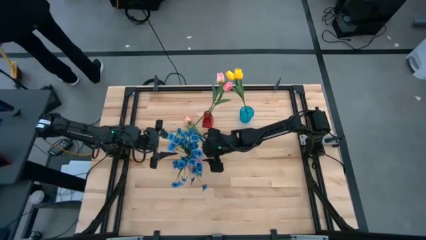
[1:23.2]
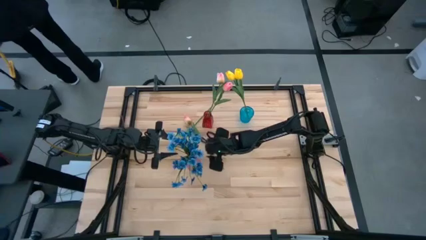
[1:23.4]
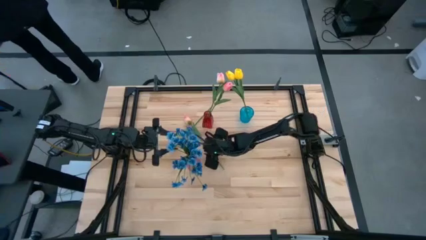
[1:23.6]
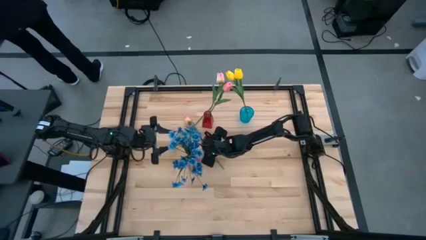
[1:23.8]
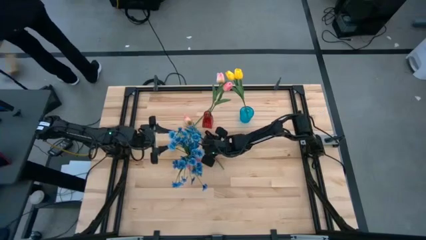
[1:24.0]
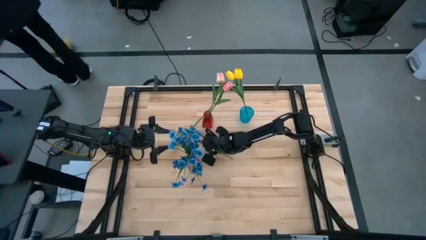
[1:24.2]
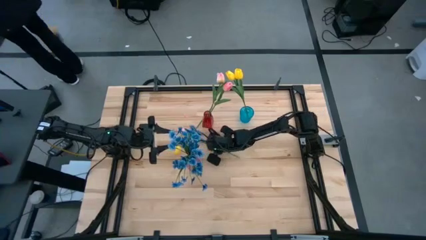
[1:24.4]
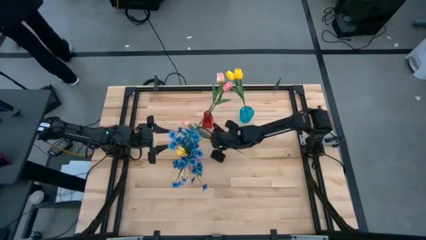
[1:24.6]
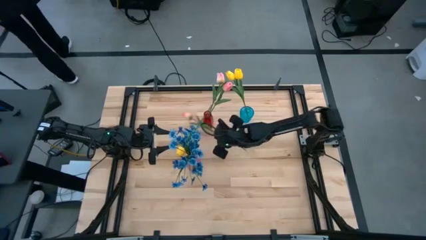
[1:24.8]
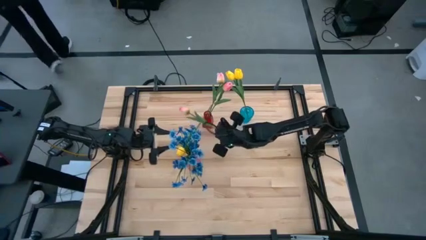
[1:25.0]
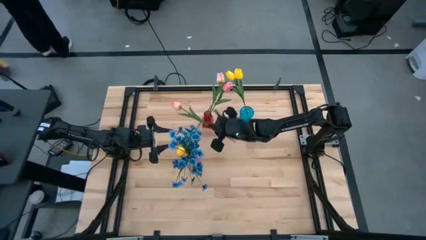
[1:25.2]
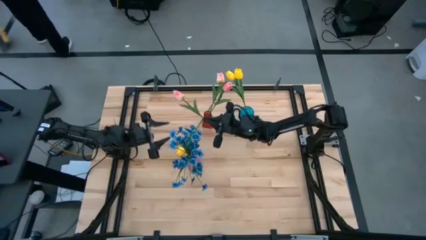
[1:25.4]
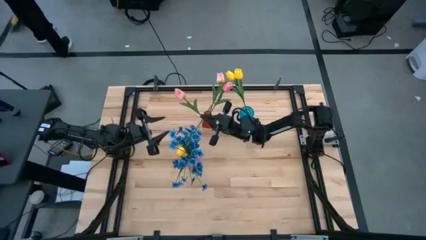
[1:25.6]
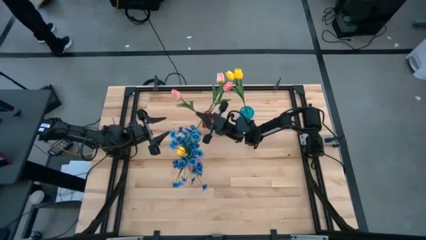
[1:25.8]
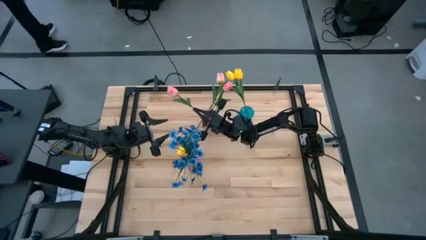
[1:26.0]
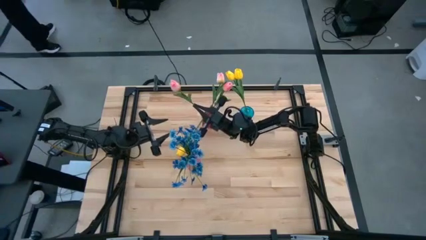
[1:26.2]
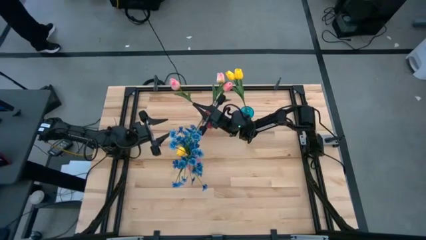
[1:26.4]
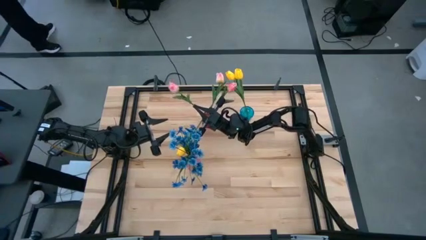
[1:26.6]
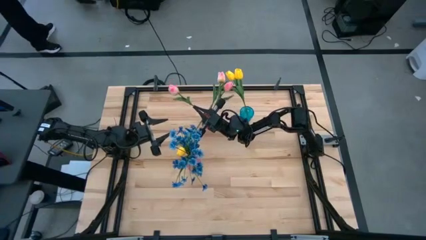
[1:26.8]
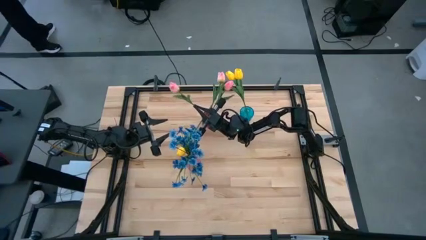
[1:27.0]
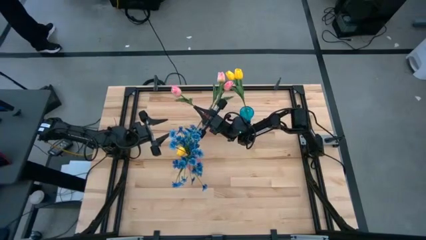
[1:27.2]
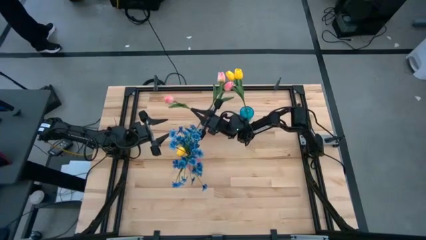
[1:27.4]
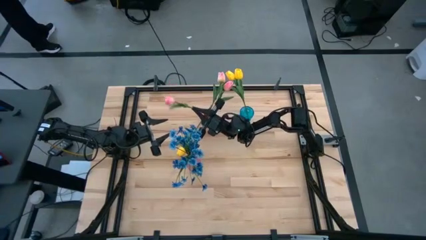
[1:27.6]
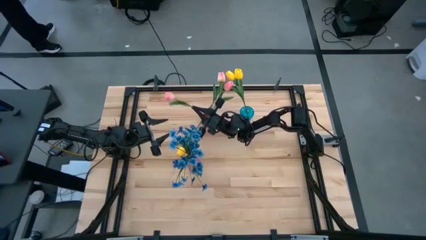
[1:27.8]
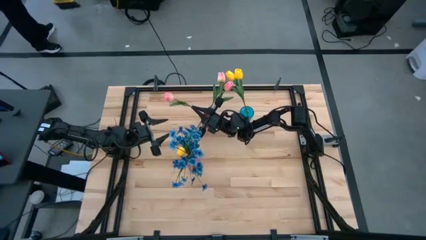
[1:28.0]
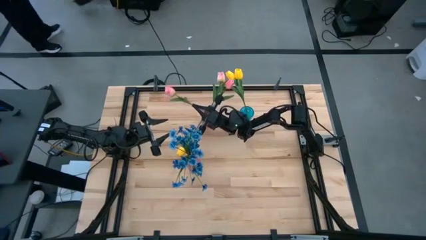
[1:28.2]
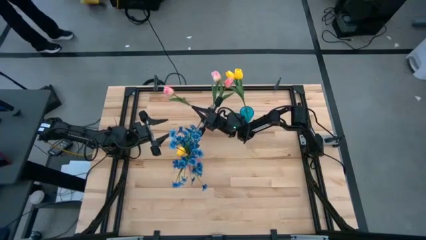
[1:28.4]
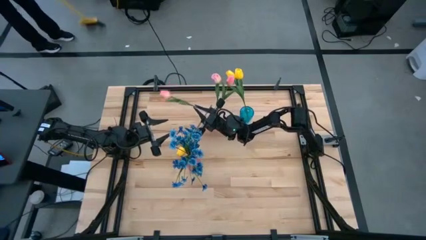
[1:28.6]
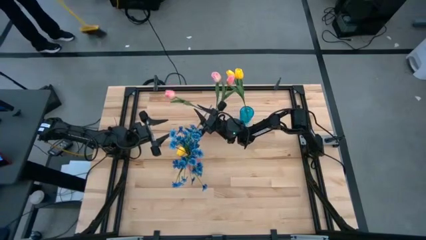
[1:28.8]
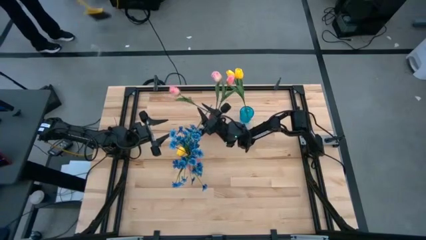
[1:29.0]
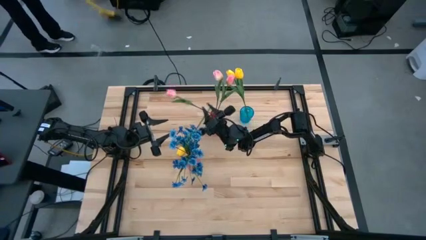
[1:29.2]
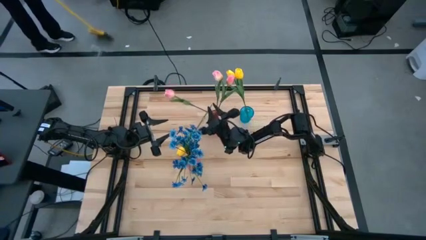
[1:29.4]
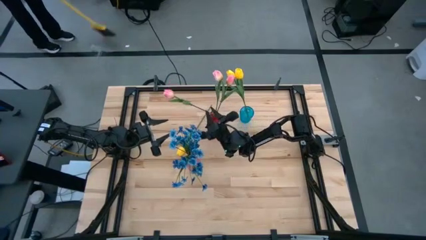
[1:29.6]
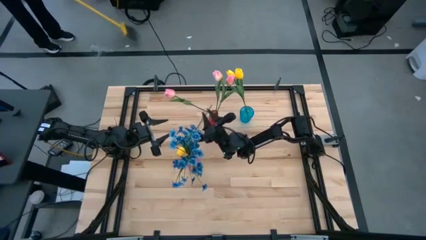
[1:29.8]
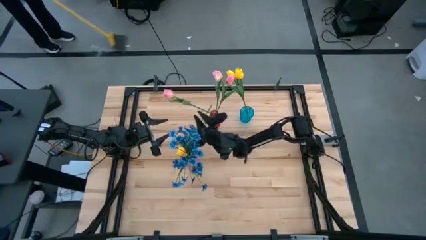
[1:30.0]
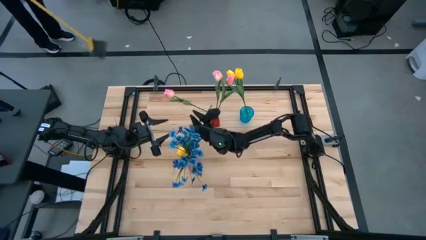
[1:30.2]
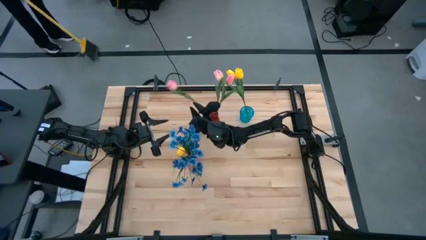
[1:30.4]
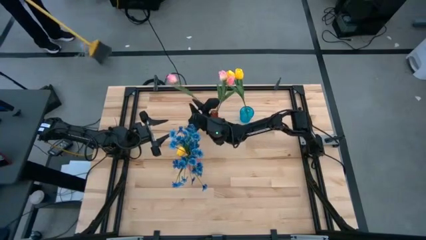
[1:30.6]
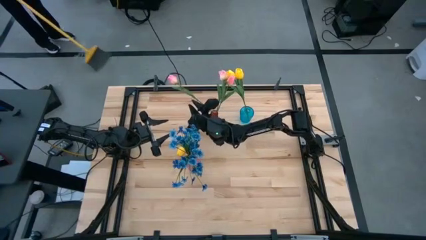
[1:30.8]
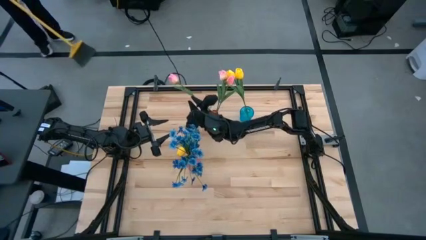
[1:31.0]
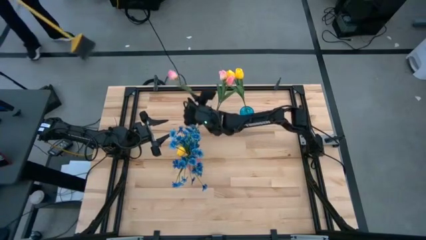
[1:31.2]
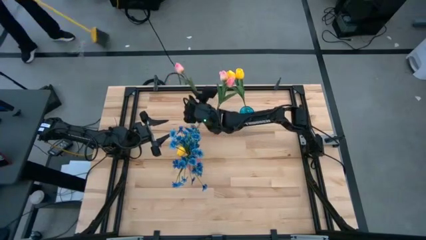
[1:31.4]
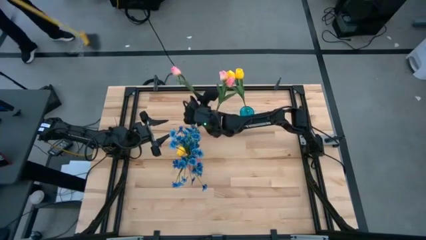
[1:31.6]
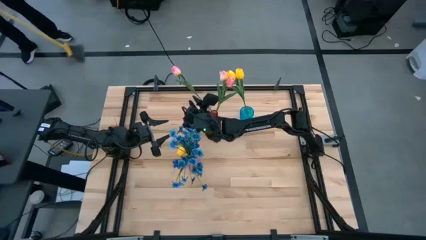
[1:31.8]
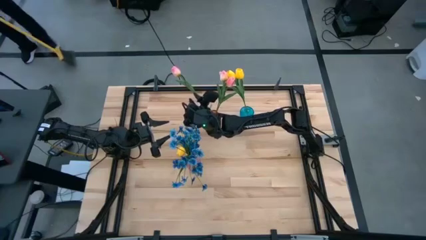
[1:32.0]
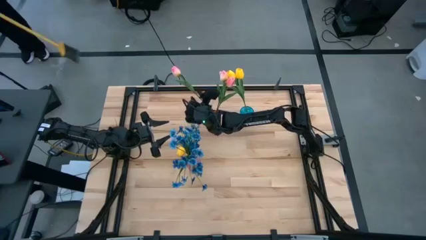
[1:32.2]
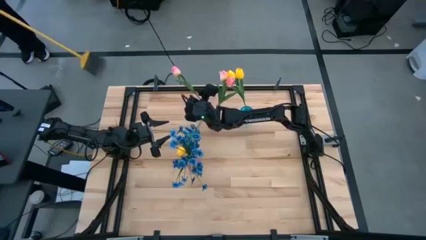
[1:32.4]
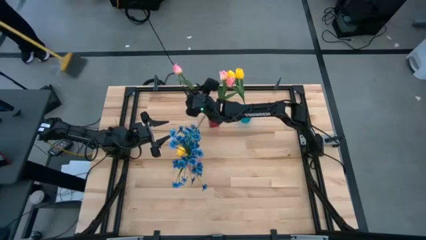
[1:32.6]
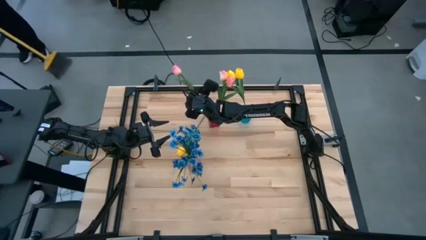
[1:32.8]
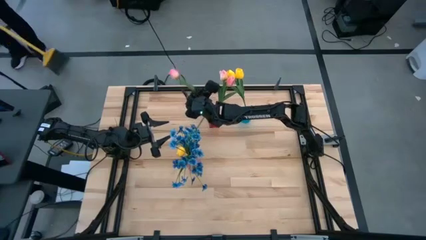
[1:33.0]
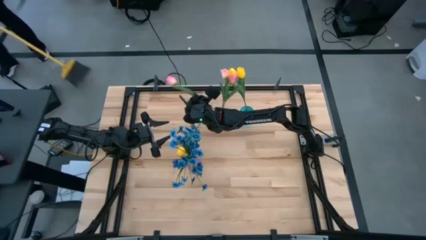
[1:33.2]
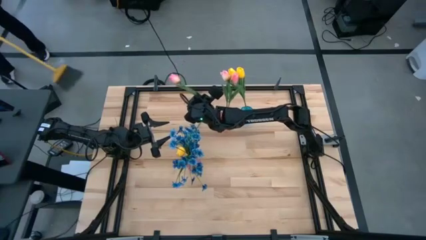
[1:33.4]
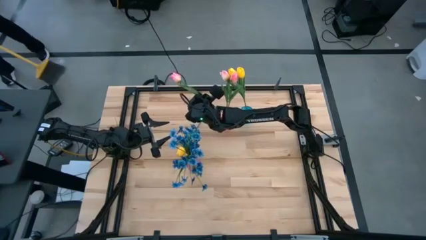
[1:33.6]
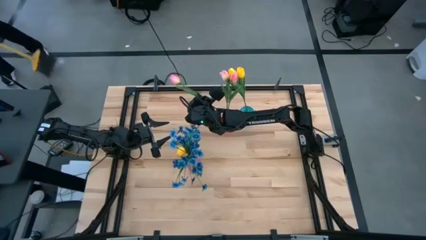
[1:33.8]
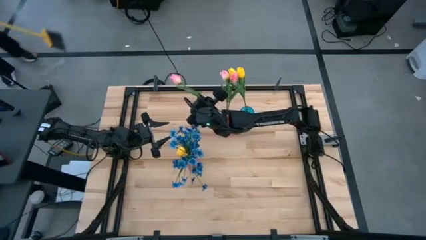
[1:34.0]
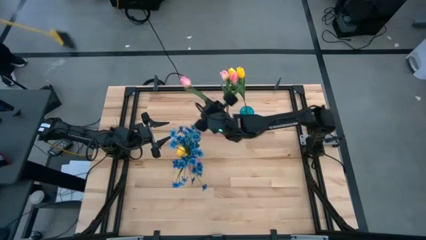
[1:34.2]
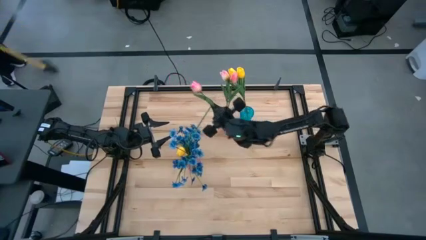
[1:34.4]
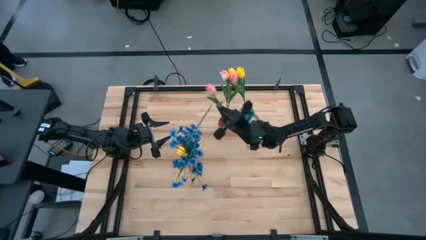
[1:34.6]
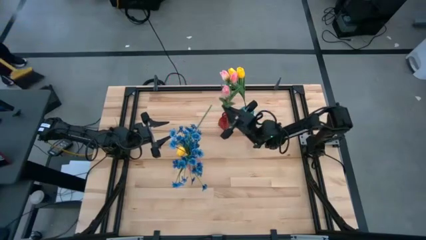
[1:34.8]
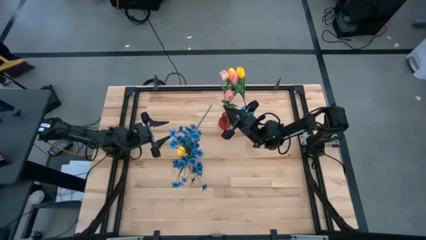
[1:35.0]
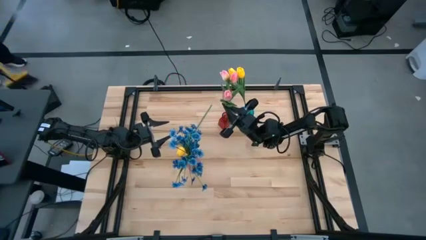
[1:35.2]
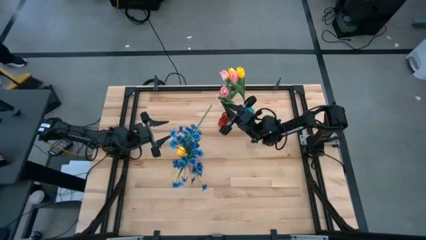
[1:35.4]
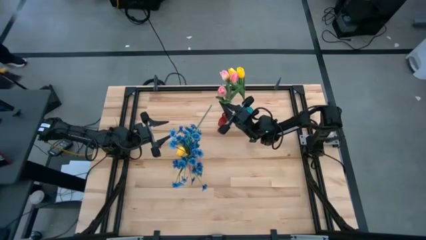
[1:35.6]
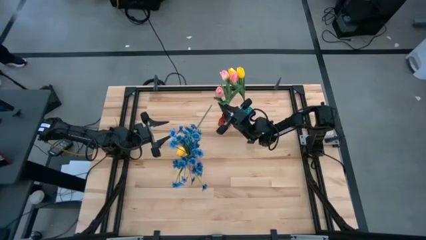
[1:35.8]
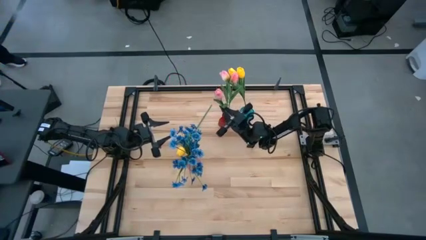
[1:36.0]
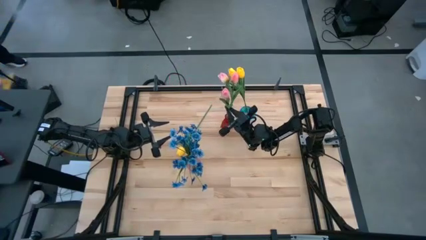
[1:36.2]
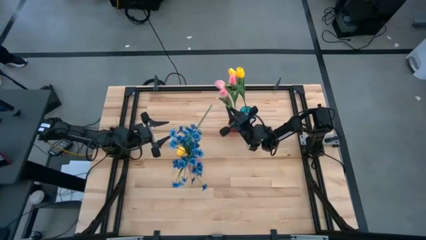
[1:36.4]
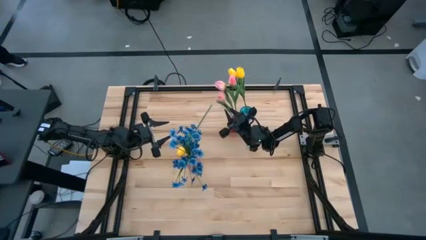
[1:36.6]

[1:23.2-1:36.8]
Task: Sort flowers into vase by color
Put the pink flower into the red vase

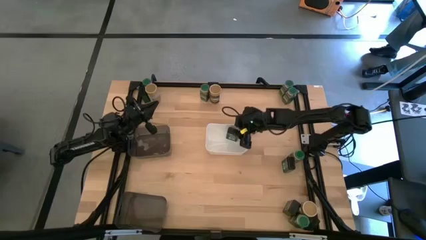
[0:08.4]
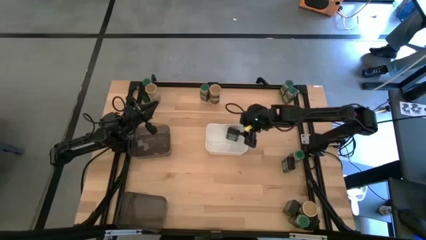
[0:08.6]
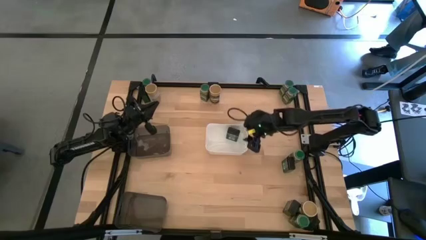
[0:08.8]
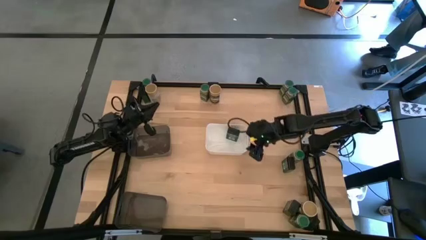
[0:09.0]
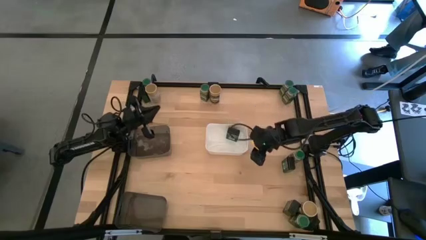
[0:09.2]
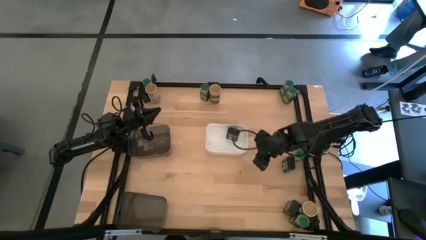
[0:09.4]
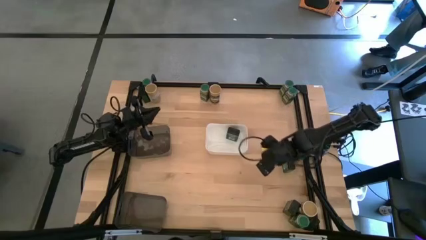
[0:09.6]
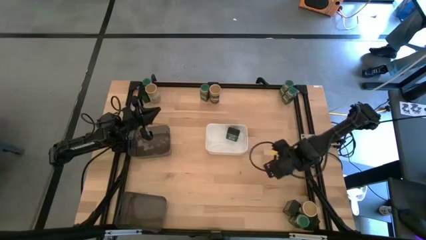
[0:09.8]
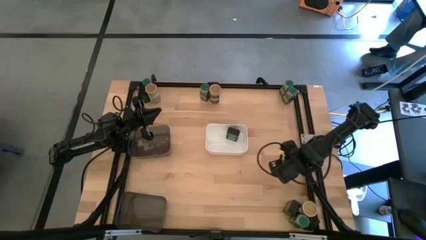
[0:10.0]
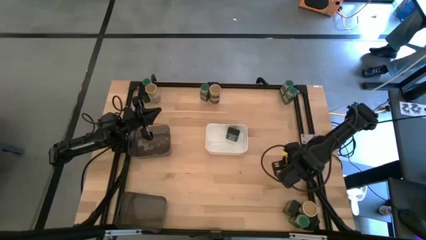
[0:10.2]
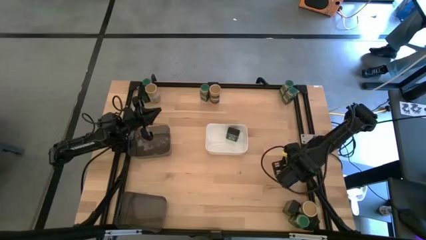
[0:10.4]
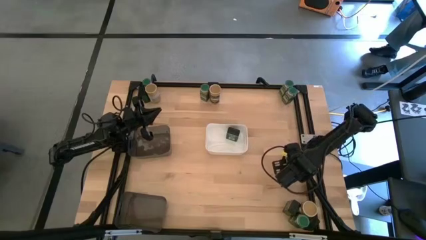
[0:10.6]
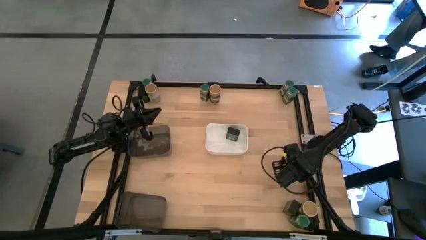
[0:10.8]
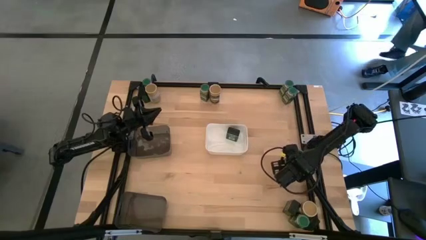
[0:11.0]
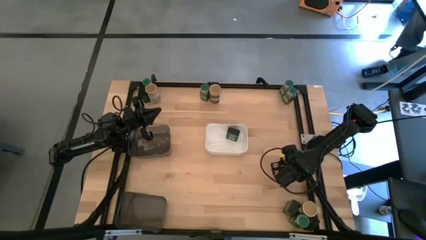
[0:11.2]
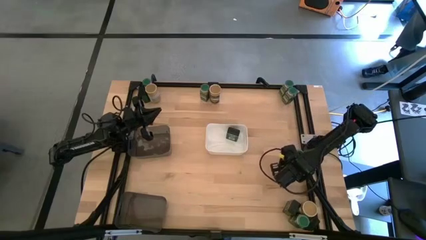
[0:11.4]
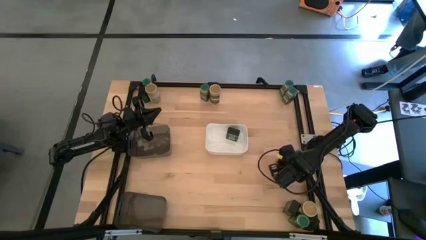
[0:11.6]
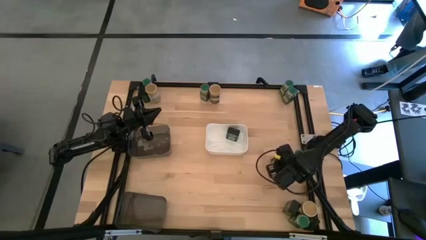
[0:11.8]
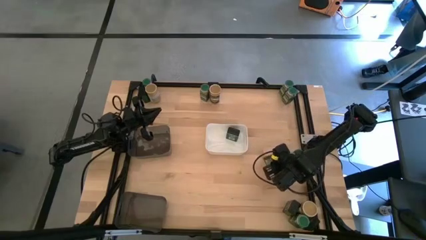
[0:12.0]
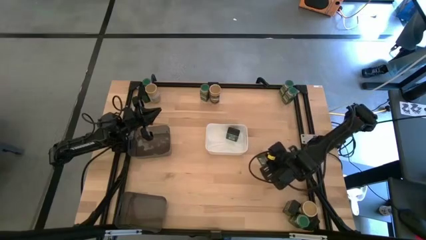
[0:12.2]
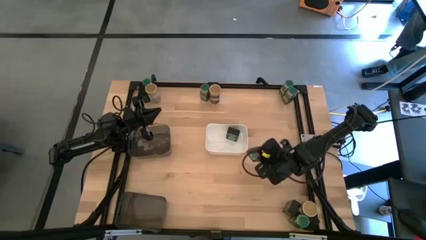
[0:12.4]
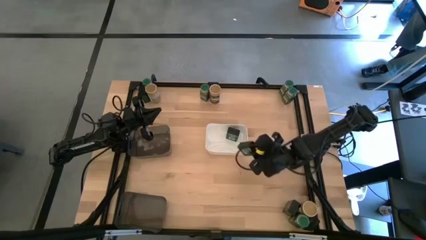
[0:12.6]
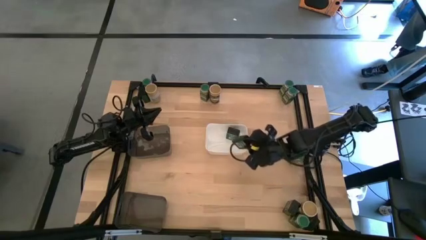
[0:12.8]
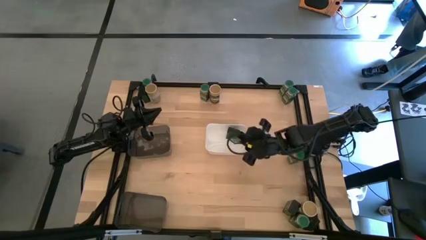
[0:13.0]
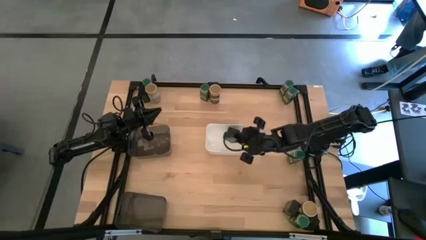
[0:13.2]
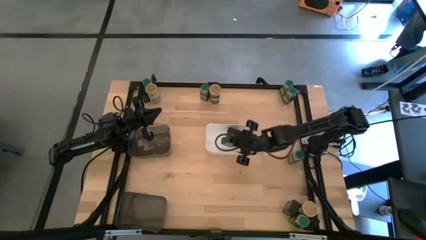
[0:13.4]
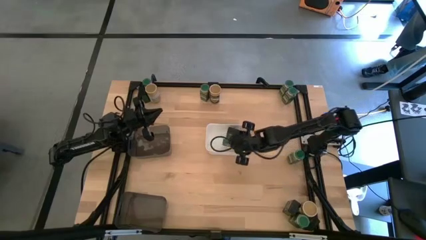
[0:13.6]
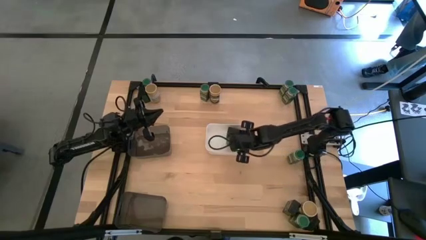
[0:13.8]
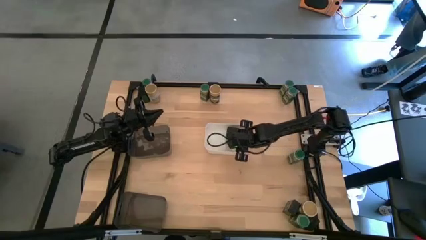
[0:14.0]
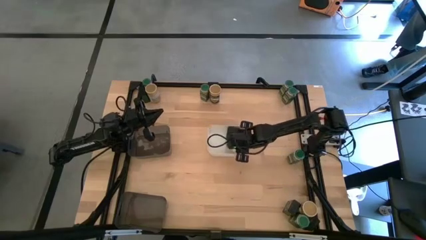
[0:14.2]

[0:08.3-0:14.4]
Task: Sort spices by type
Put the black seasoning can into the white bin
